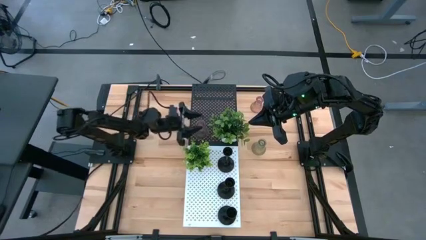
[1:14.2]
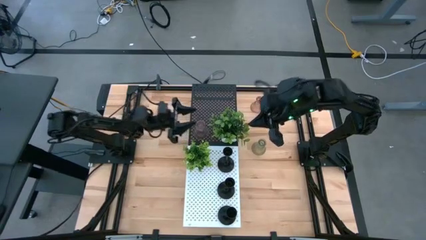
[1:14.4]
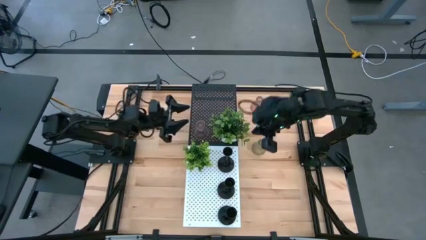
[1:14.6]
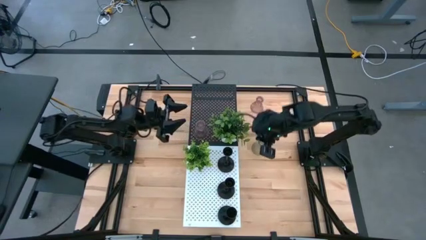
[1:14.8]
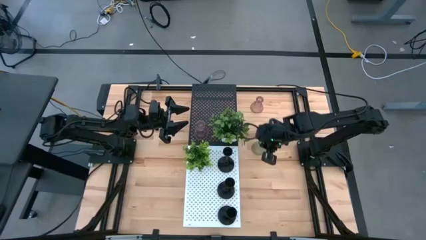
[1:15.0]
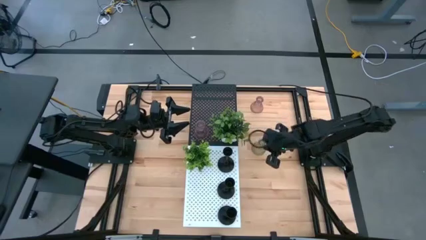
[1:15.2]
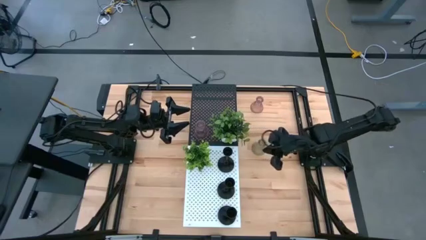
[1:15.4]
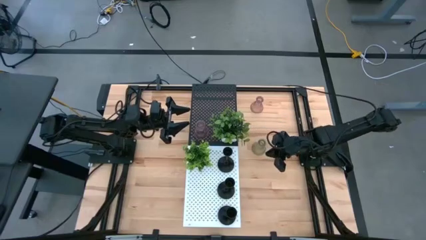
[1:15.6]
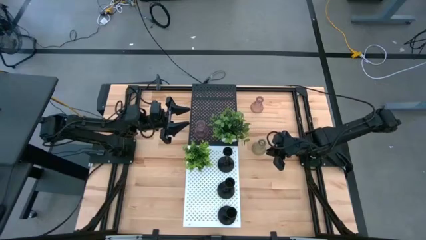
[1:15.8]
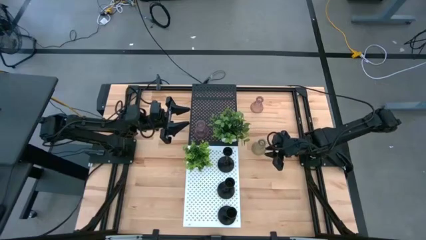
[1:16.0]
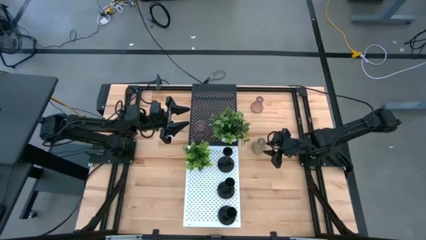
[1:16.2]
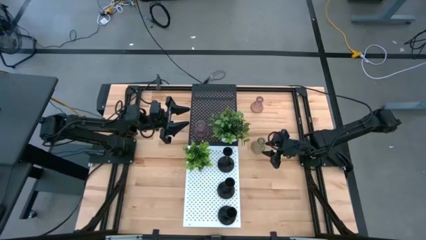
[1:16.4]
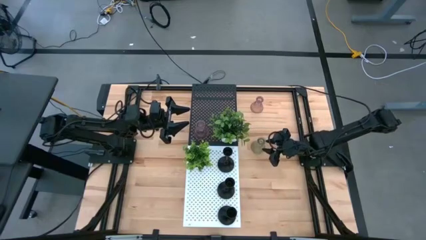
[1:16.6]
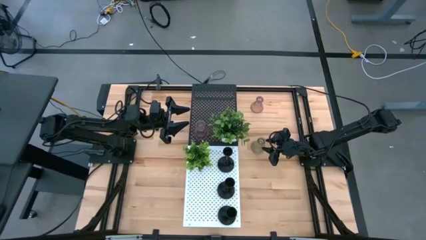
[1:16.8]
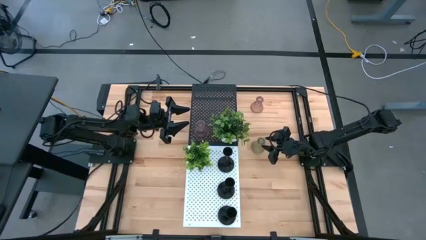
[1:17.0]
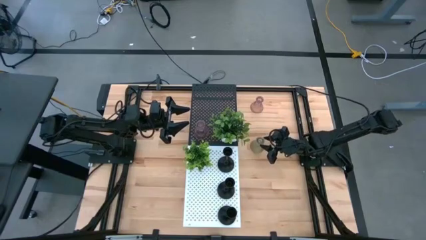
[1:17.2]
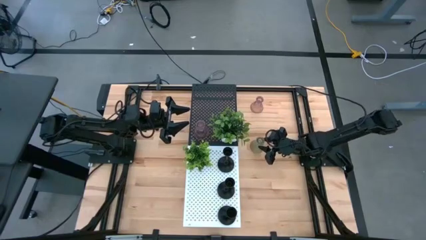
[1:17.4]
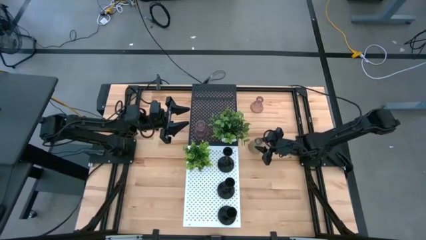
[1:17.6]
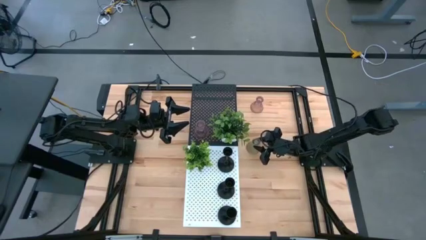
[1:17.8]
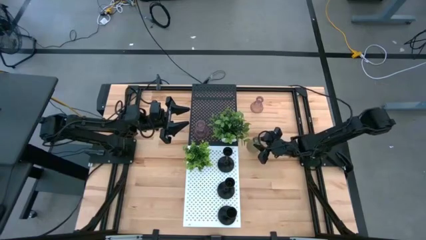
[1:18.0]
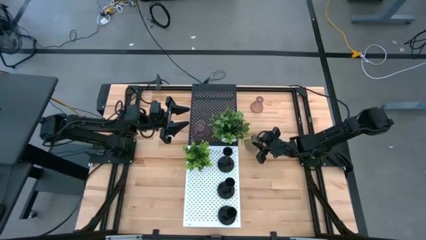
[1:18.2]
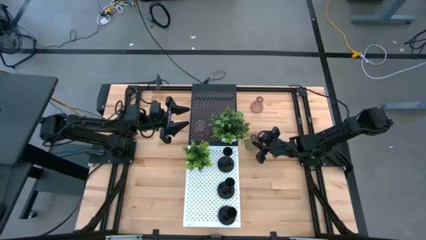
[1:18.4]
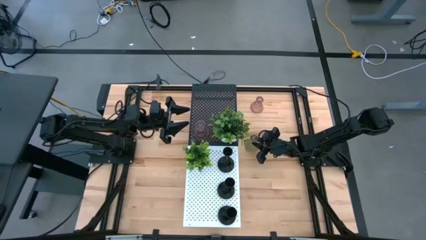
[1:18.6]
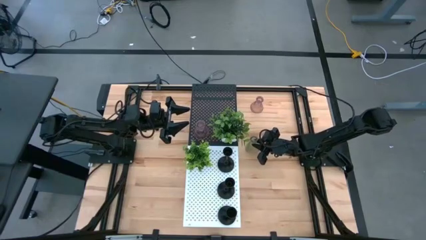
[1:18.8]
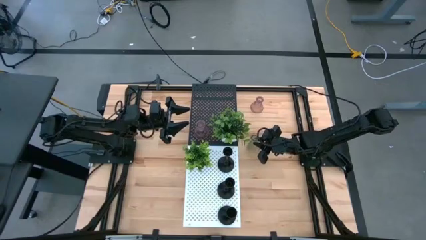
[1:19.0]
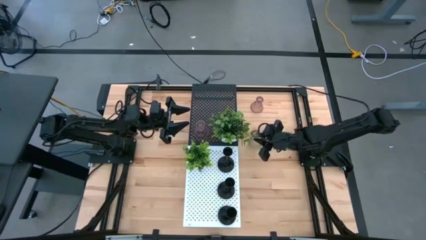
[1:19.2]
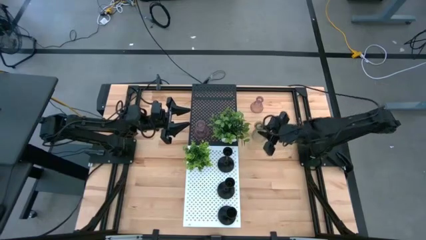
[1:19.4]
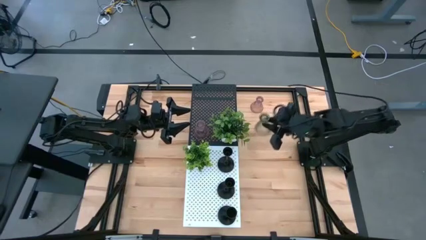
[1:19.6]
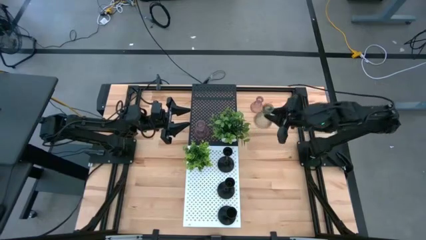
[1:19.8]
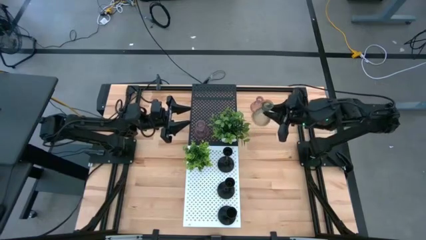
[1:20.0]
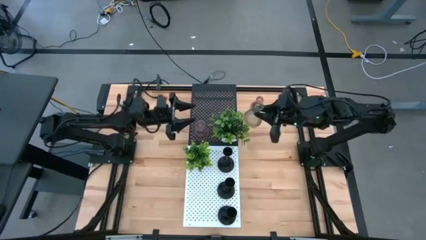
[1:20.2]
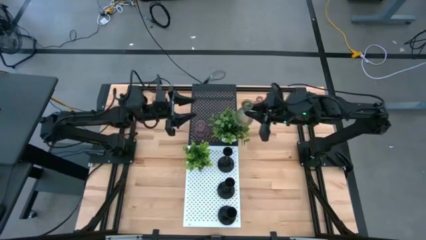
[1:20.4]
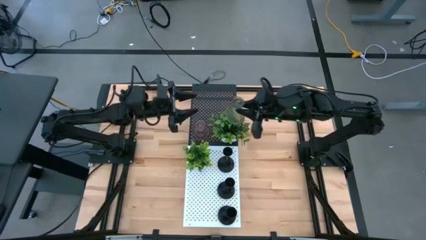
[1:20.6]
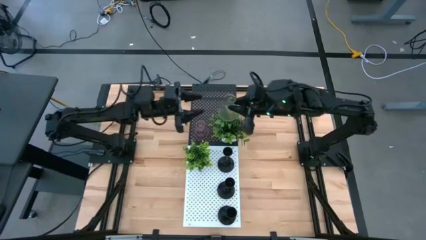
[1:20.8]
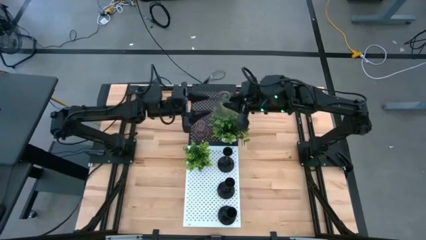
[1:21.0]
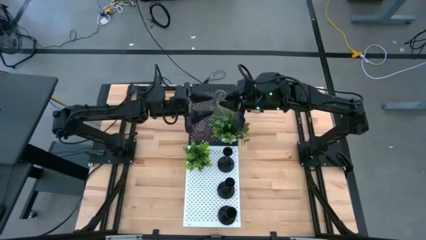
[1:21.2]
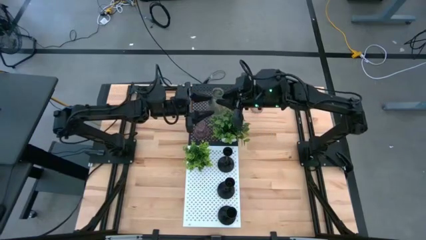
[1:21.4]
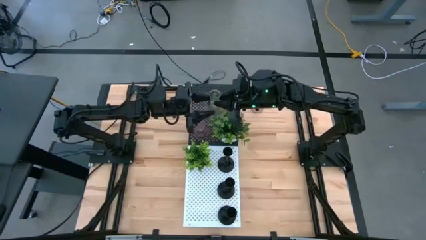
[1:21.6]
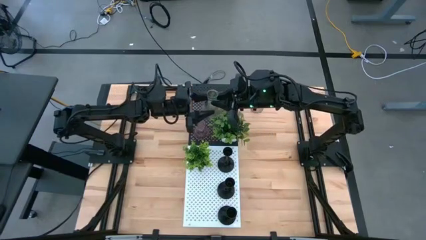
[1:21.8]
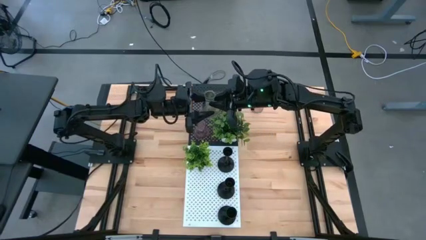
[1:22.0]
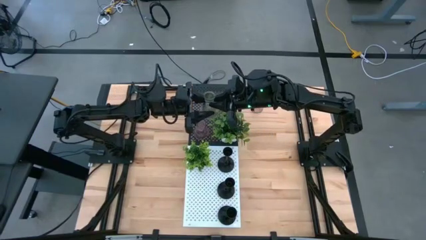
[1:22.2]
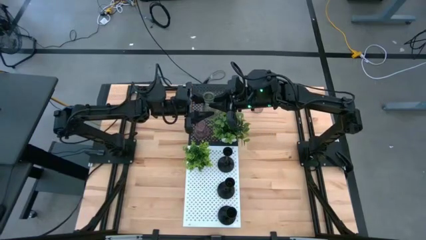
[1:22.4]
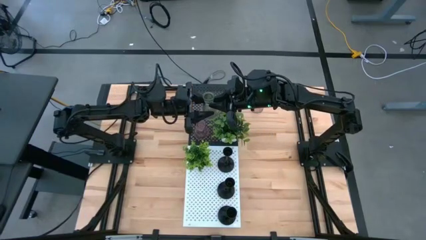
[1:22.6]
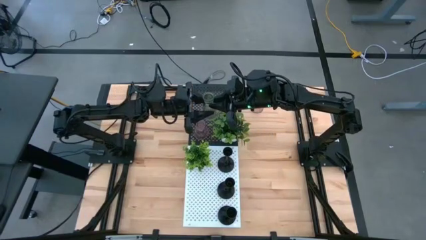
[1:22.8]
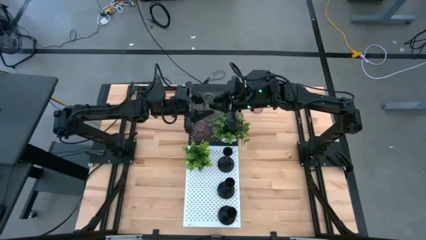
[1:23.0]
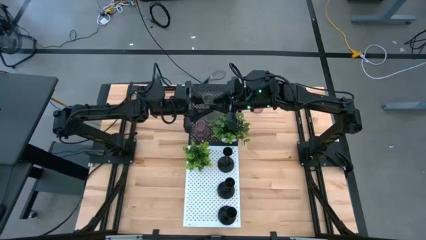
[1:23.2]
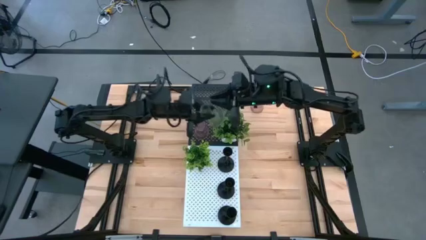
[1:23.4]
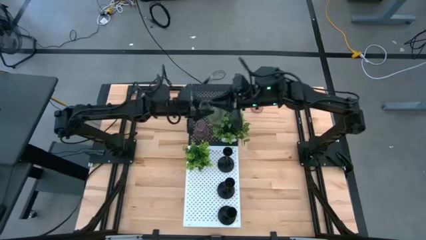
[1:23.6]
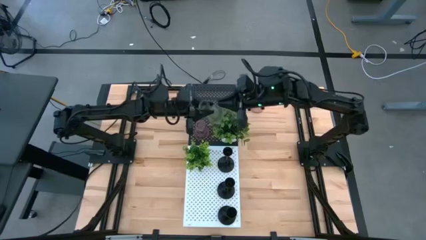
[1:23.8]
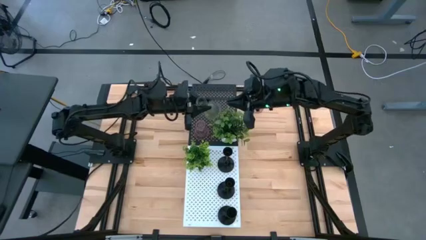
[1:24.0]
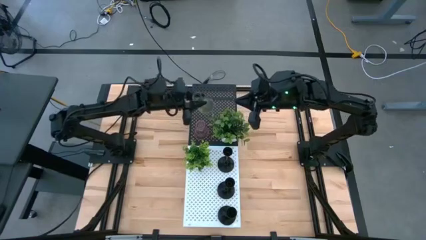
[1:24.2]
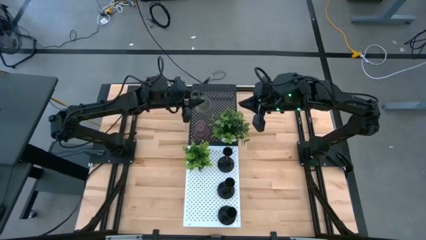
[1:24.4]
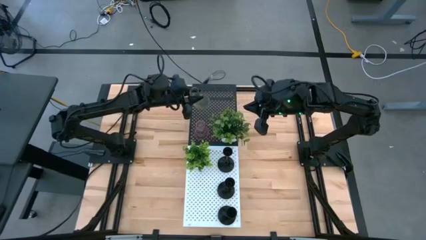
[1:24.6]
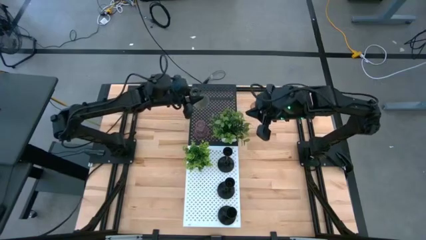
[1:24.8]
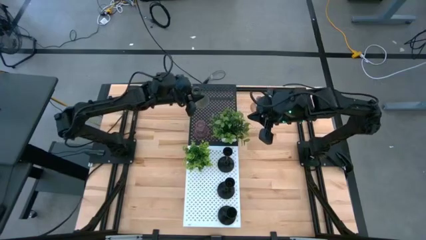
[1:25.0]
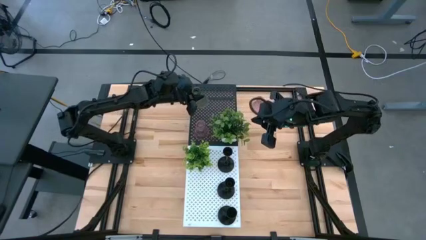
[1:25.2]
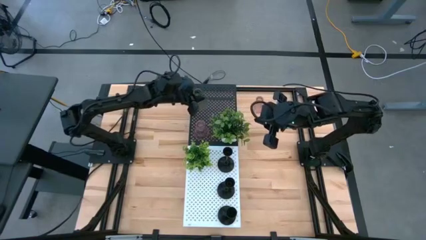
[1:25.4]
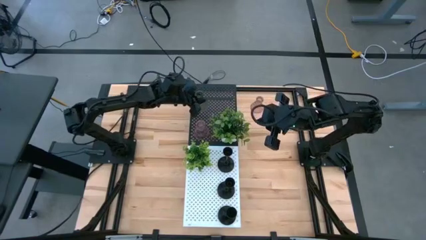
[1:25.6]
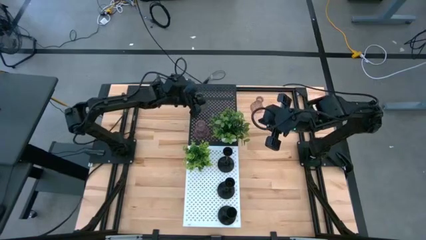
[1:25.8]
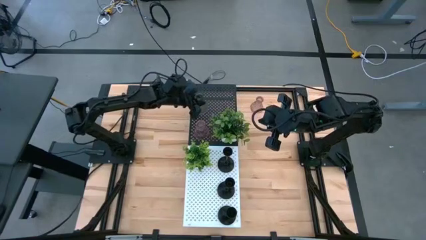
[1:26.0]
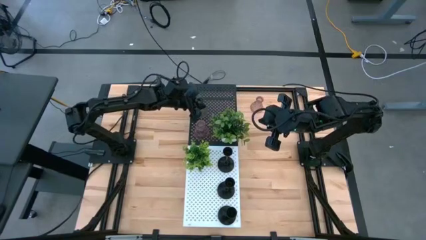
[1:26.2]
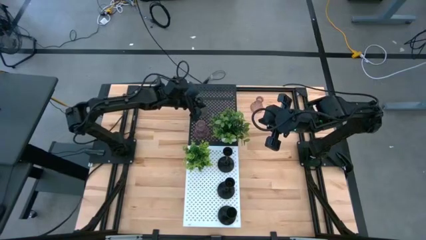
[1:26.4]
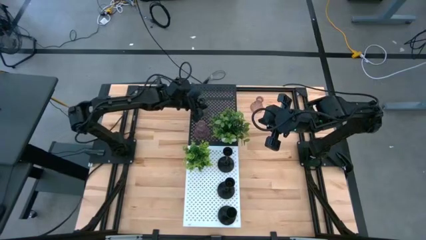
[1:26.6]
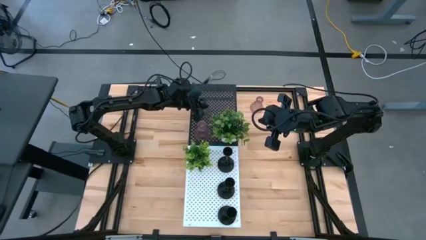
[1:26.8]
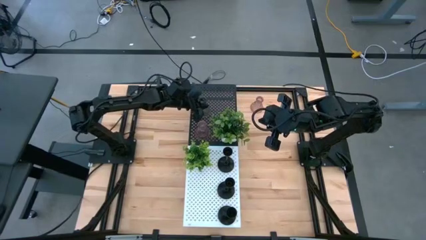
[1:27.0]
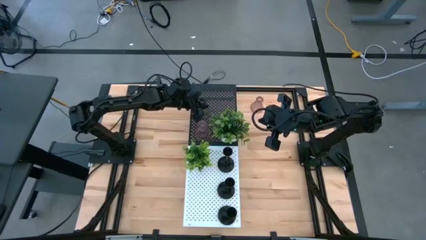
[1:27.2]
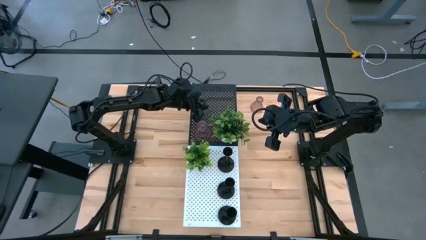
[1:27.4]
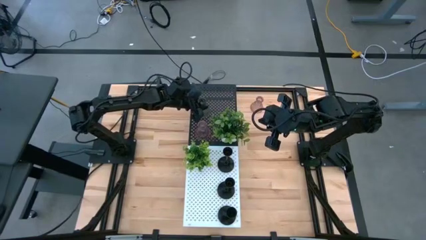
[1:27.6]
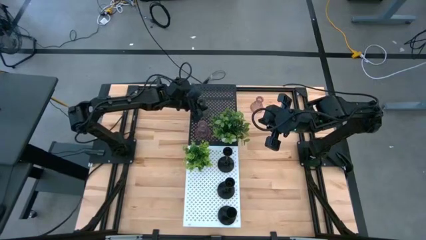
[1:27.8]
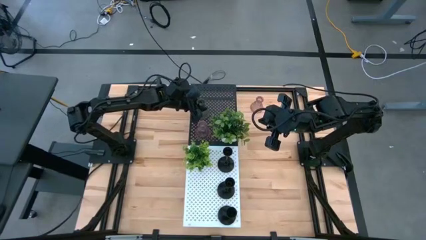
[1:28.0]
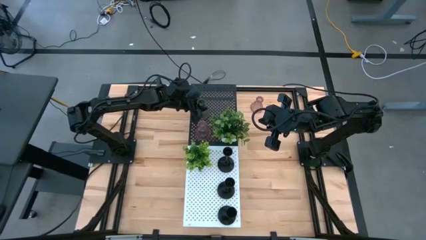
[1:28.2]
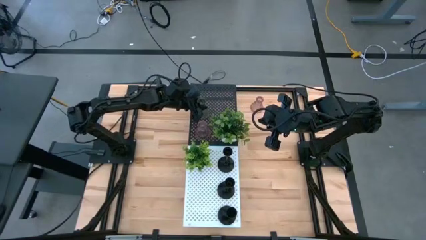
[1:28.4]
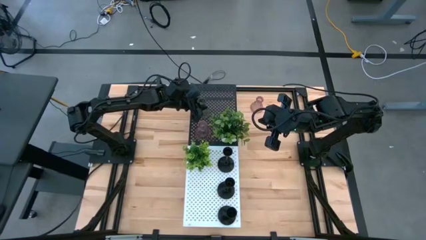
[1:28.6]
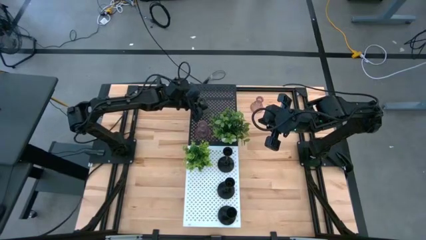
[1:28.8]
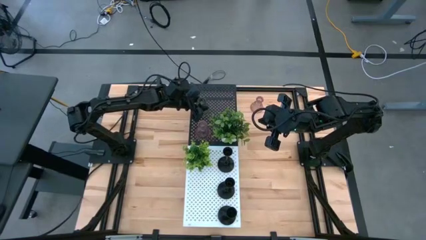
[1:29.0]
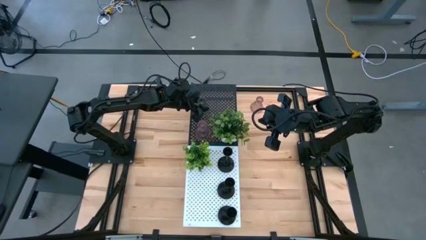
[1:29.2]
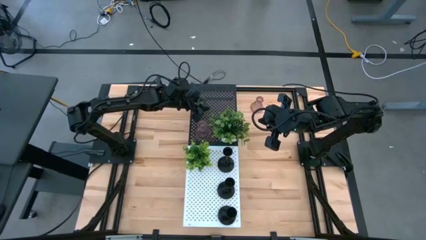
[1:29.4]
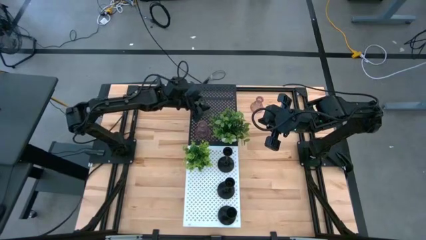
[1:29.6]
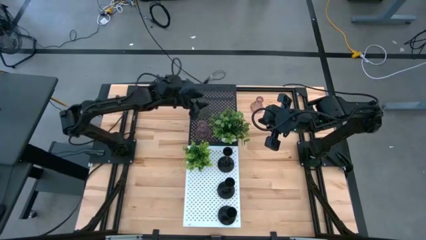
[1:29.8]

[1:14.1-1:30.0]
Task: Pick & Place candle stick holders
Put the green glass candle holder on the black shelf

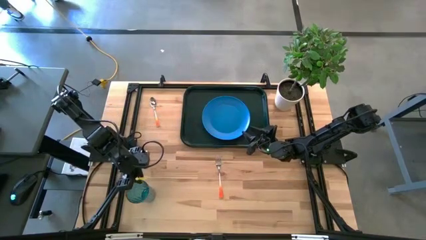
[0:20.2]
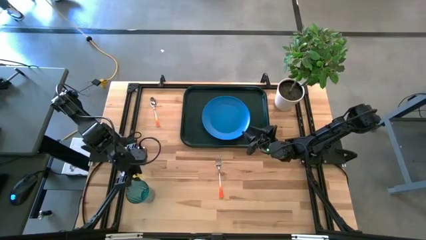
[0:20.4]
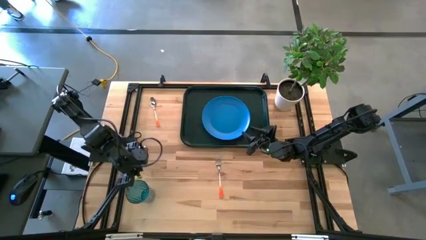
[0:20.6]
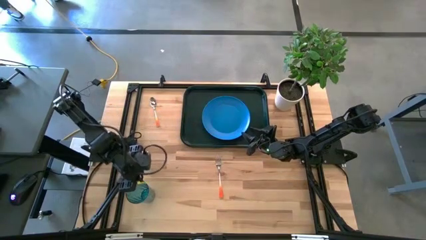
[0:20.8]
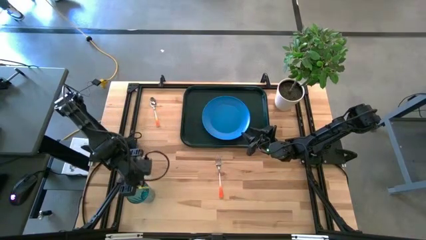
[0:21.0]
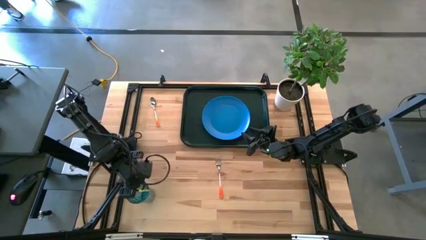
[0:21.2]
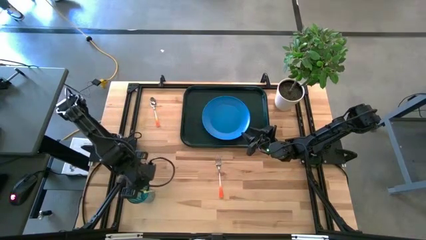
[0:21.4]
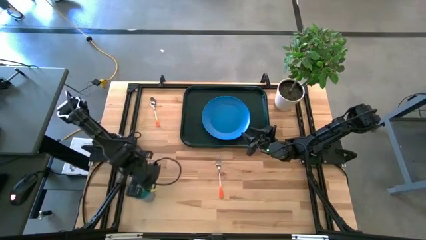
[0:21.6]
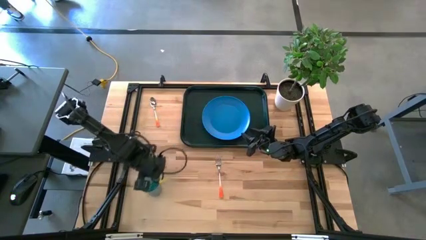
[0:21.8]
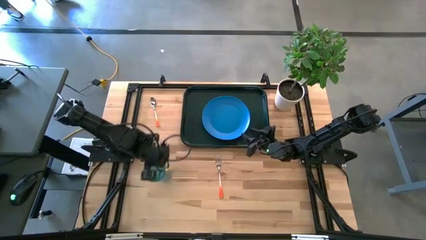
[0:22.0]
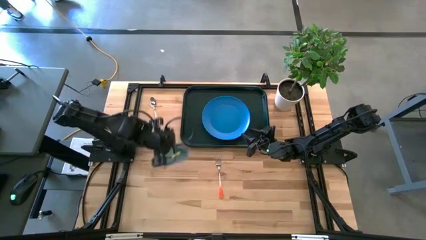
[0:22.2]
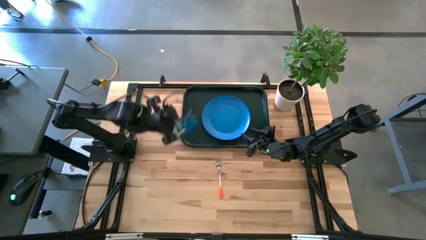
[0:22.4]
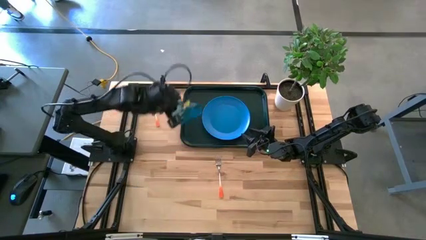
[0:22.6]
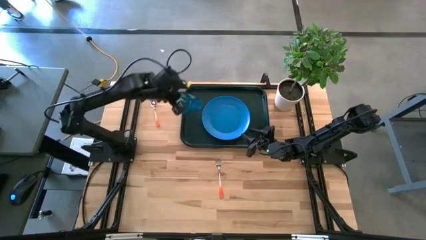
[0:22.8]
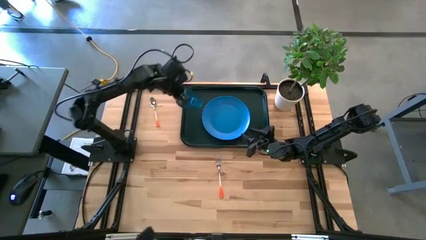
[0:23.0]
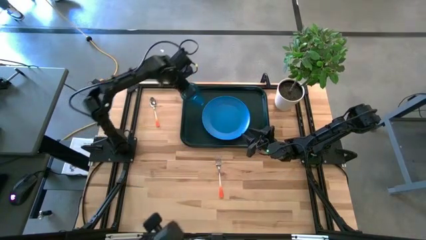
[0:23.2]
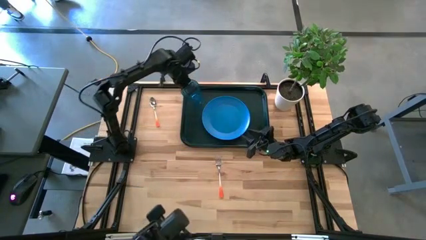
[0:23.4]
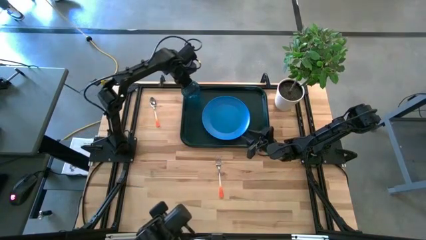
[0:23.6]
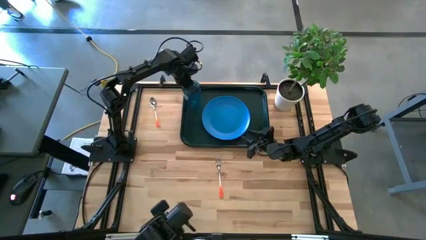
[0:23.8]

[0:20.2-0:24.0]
Task: Pick and place plate/cup/fork/spoon on tray
Put the blue cup to the top left of the blue plate on the green tray
